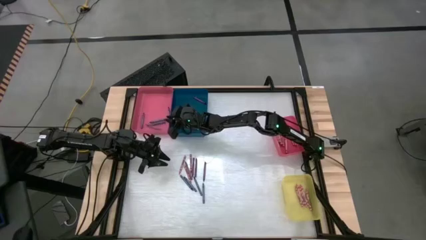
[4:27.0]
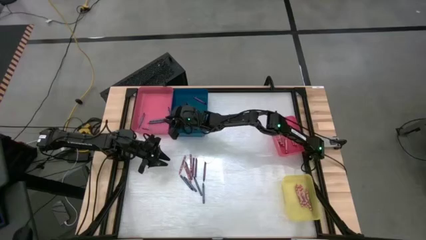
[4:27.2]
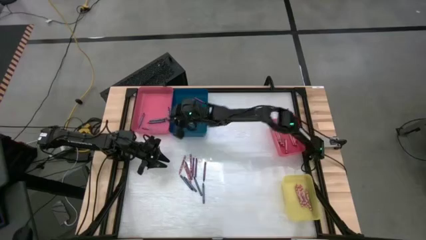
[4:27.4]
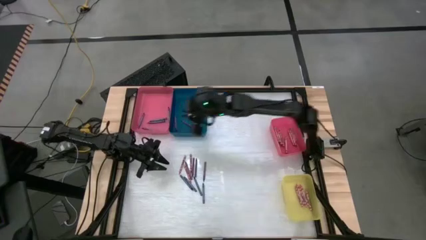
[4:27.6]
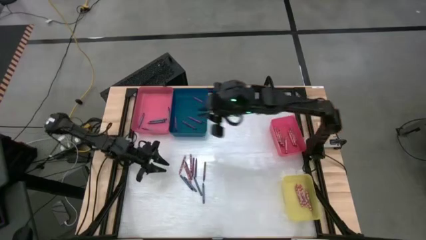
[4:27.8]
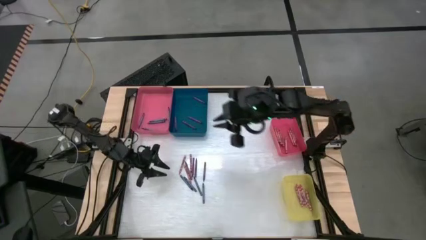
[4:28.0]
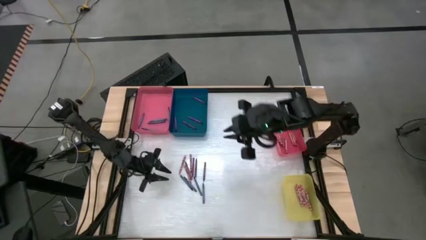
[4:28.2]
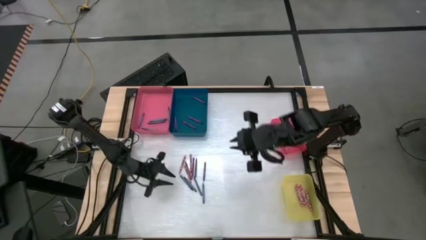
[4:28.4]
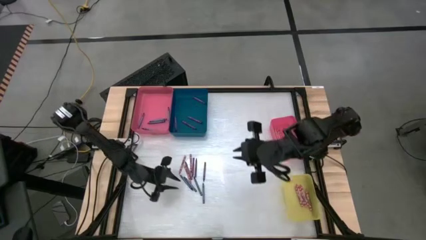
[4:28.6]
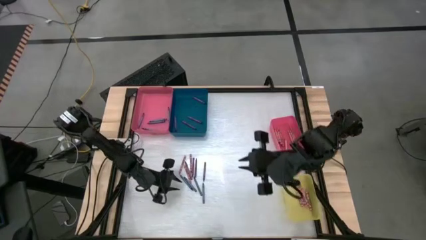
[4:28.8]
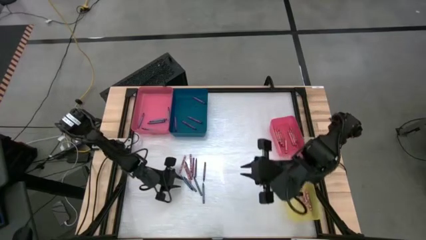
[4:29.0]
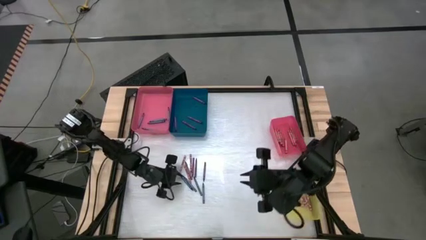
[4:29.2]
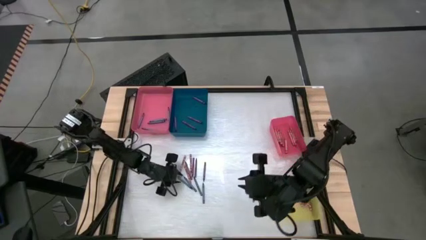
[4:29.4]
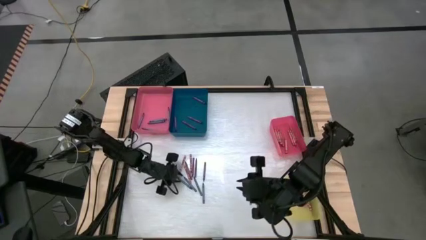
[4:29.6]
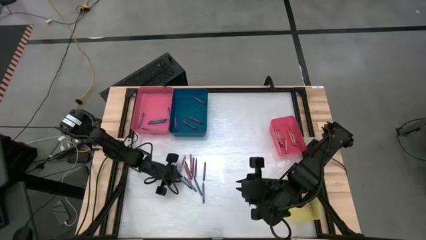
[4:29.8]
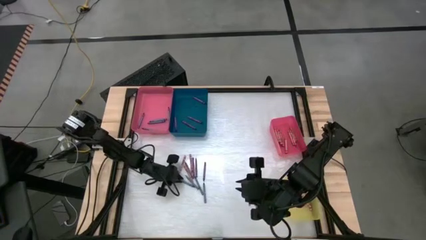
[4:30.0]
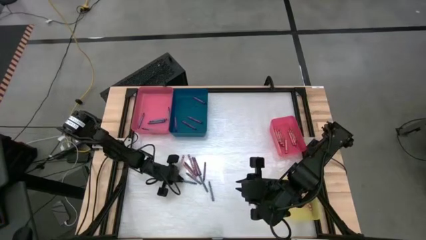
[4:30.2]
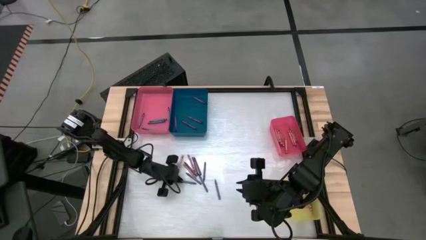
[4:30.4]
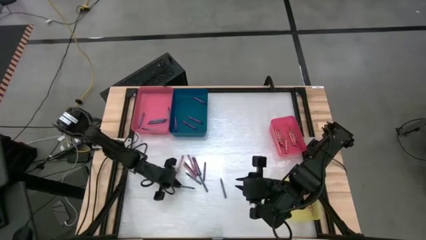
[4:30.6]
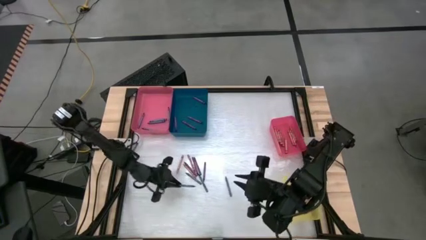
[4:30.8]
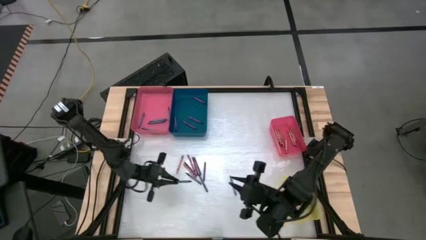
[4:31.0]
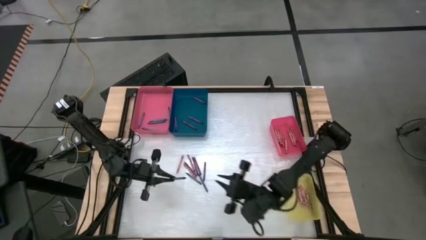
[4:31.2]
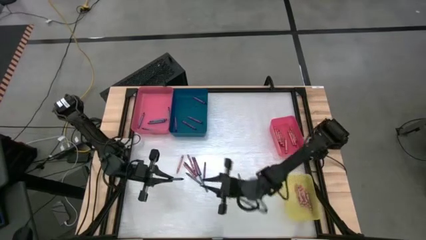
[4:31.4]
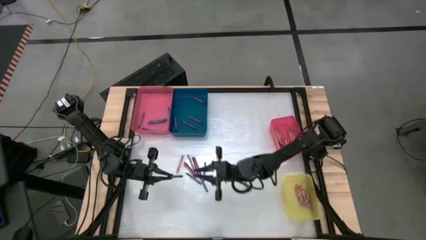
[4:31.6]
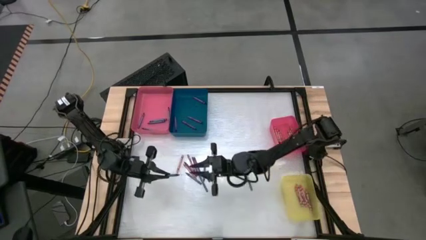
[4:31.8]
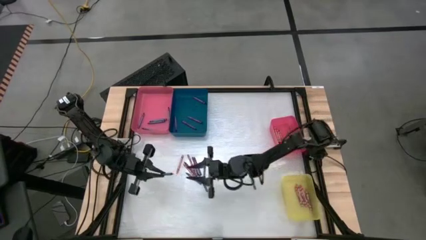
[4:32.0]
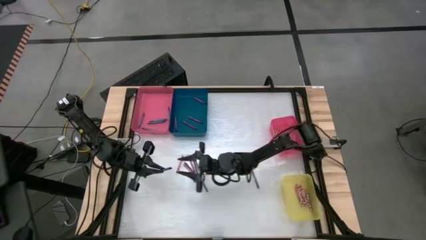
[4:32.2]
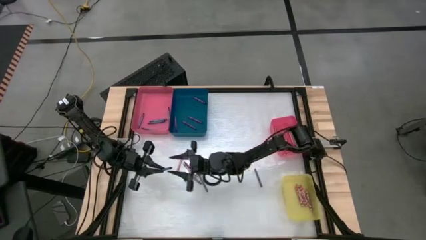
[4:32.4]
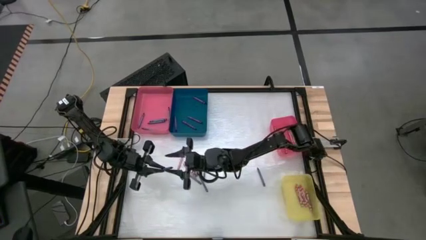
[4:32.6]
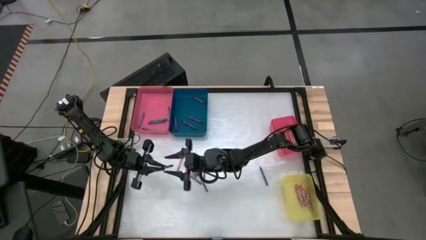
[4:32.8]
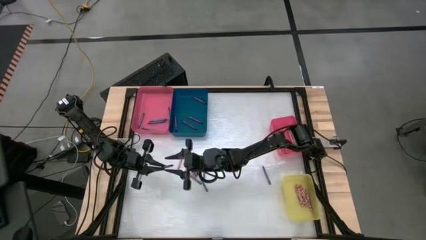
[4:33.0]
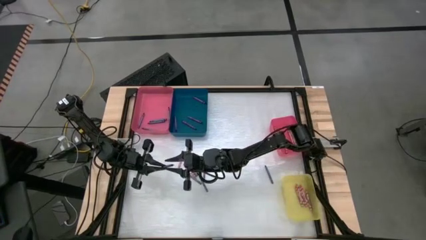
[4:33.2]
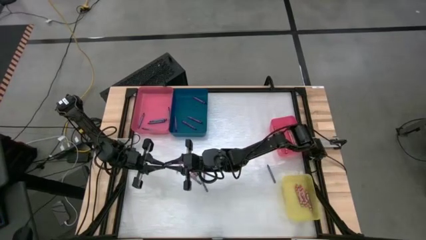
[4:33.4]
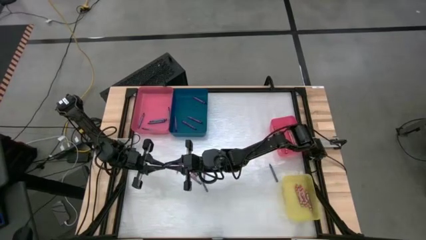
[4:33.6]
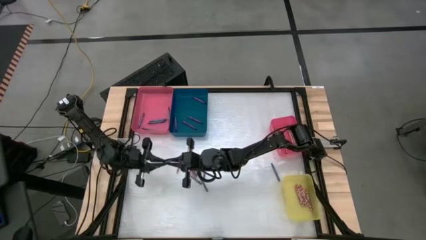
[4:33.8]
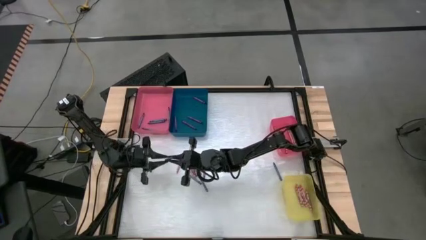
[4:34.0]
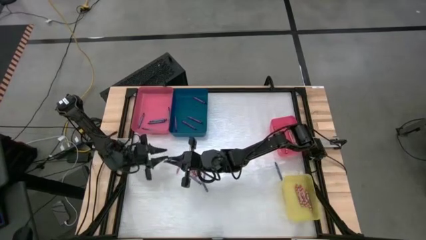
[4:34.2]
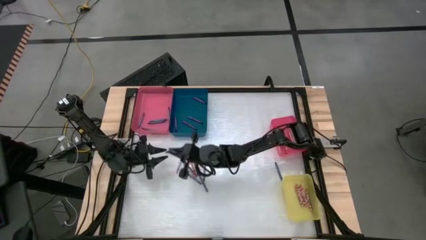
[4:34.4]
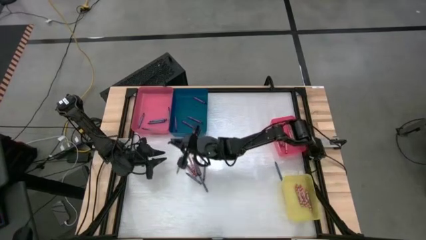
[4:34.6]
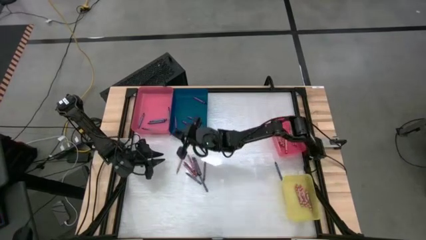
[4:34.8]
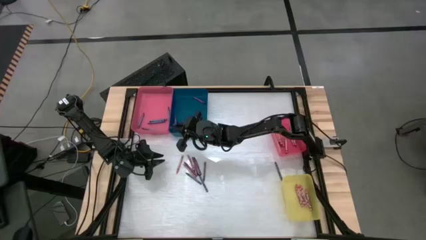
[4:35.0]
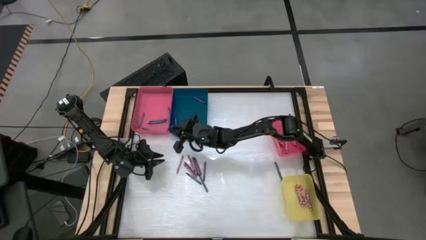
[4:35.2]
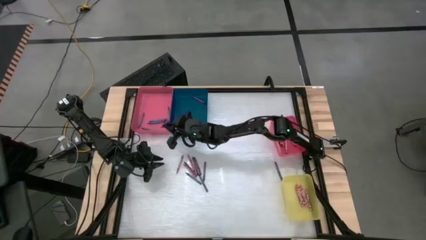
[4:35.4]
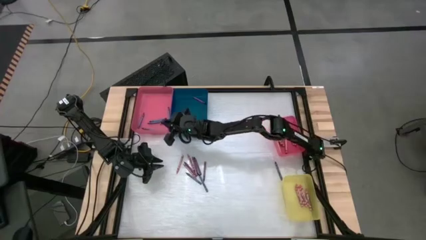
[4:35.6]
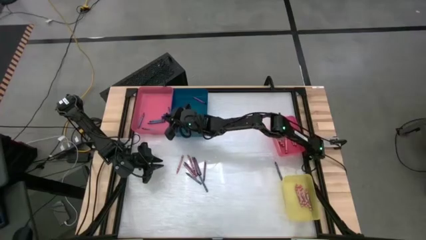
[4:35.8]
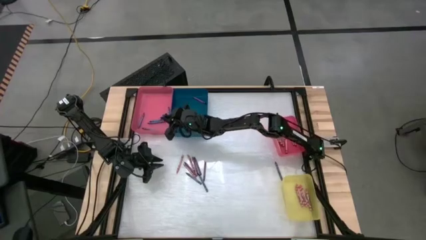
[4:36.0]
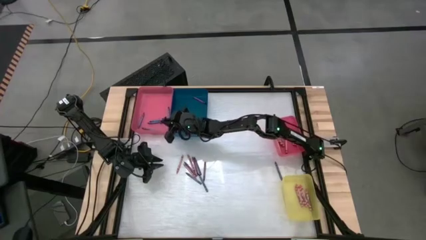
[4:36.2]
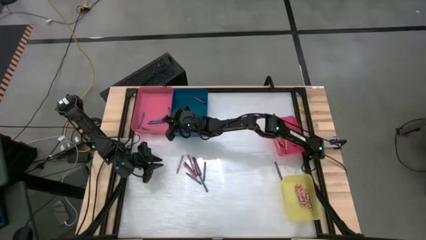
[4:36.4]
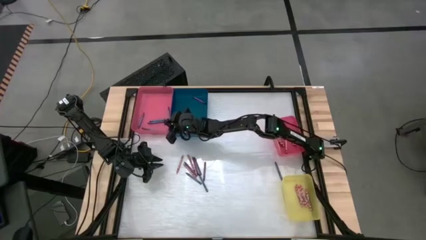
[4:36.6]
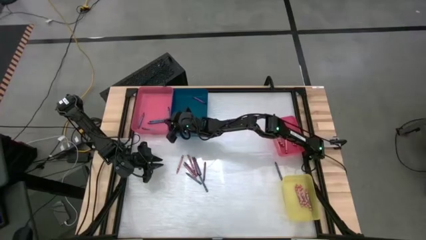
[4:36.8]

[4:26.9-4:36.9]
Task: Sort crayons
Put the blue crayon into the large red bin

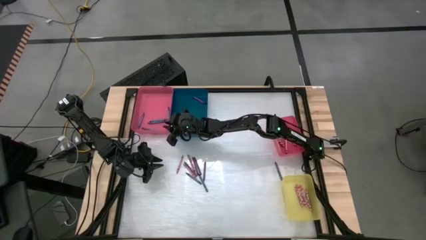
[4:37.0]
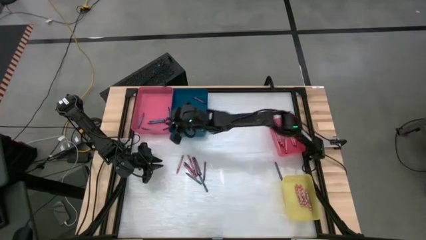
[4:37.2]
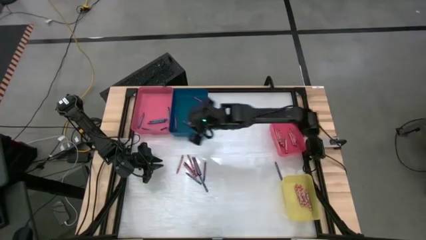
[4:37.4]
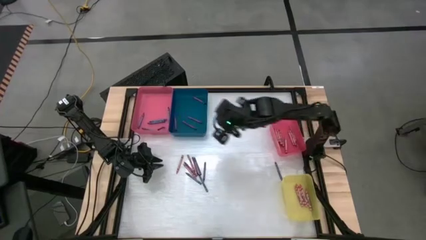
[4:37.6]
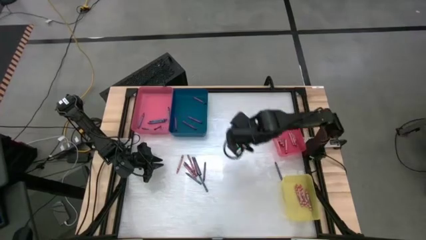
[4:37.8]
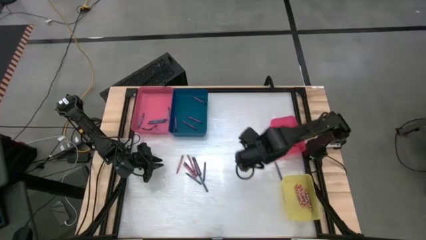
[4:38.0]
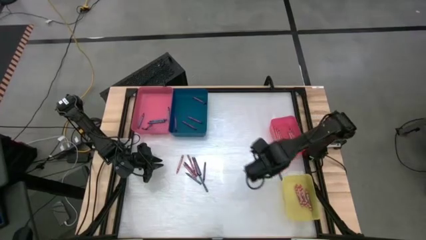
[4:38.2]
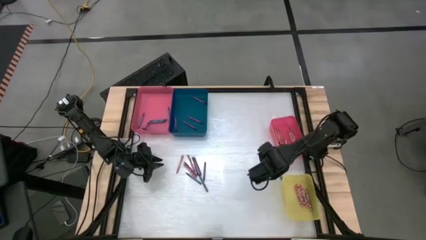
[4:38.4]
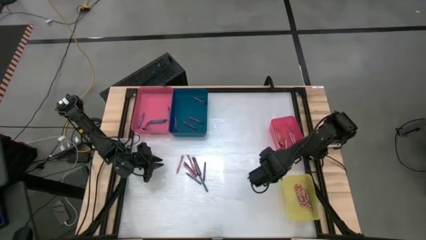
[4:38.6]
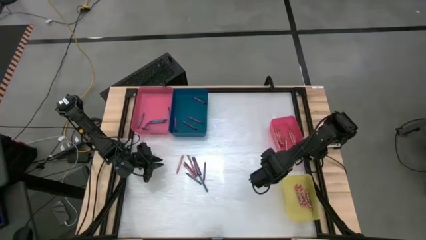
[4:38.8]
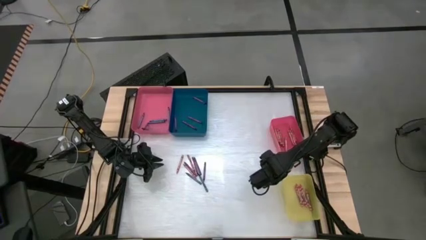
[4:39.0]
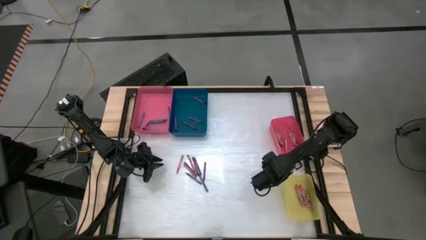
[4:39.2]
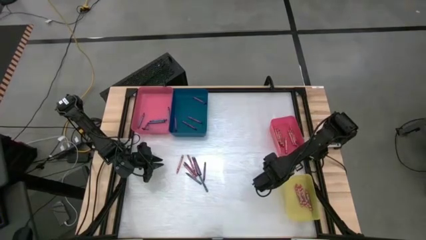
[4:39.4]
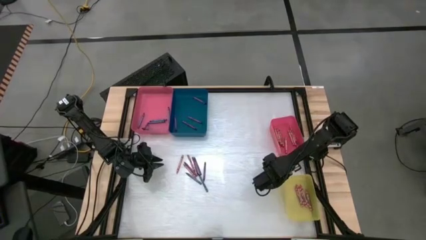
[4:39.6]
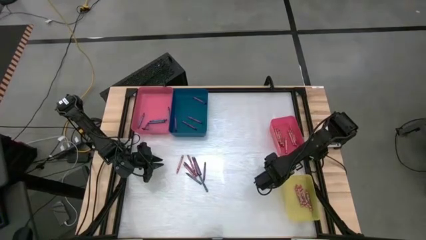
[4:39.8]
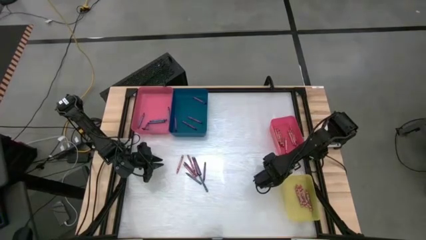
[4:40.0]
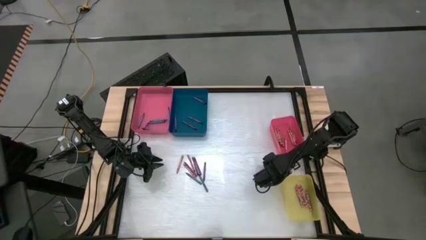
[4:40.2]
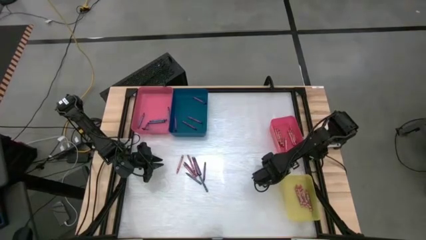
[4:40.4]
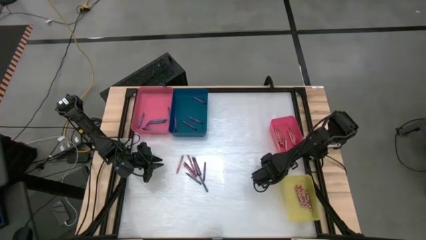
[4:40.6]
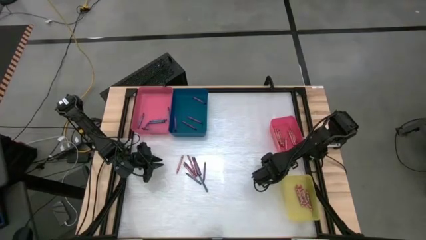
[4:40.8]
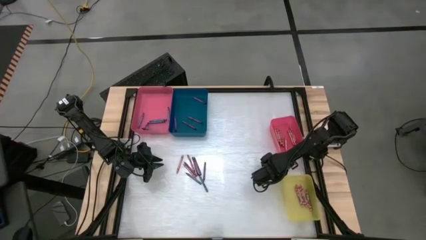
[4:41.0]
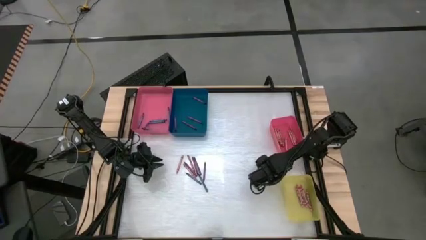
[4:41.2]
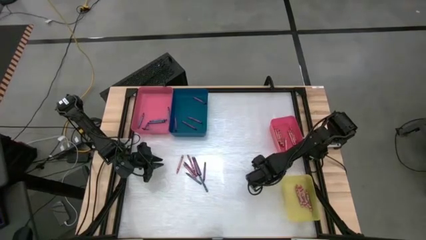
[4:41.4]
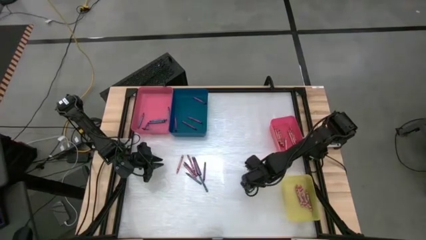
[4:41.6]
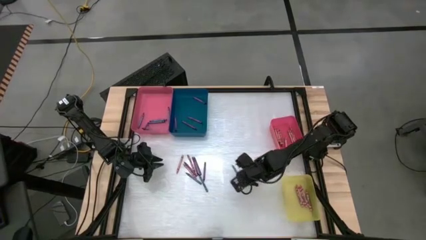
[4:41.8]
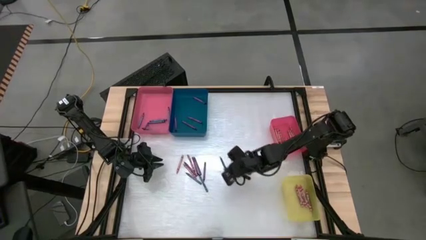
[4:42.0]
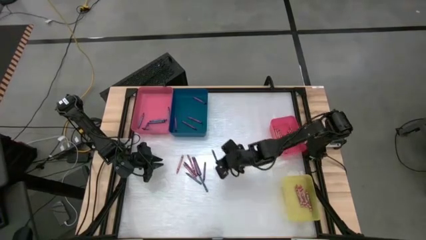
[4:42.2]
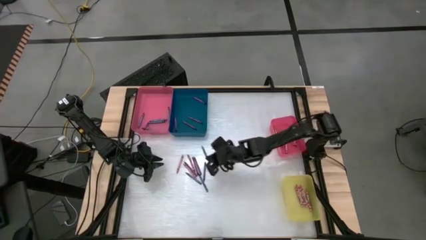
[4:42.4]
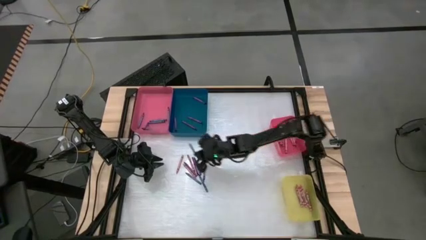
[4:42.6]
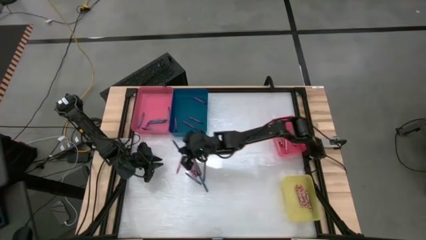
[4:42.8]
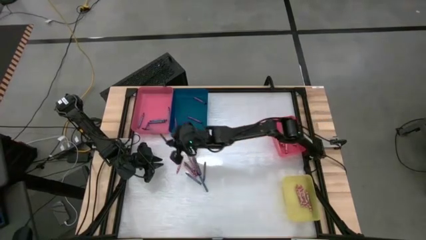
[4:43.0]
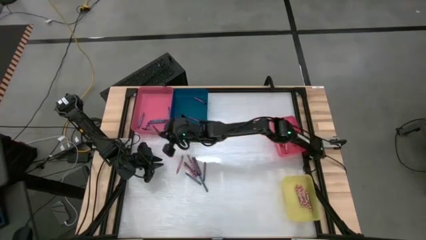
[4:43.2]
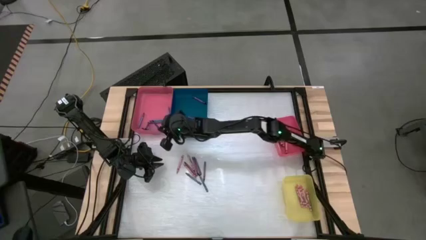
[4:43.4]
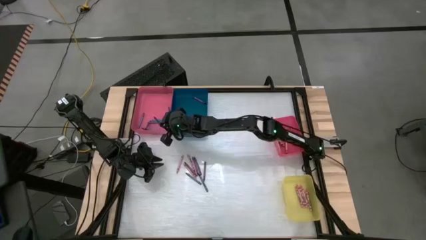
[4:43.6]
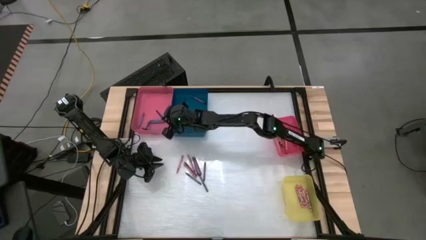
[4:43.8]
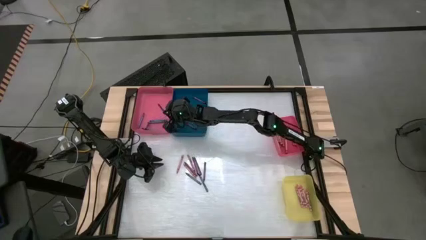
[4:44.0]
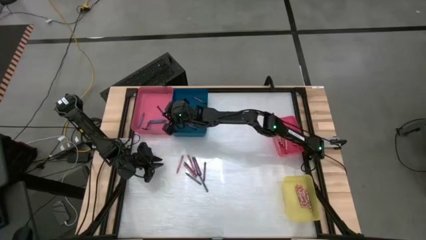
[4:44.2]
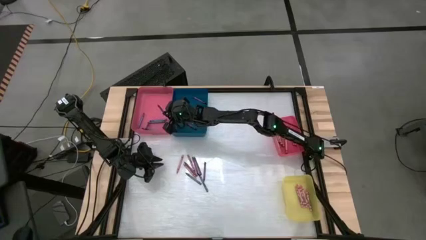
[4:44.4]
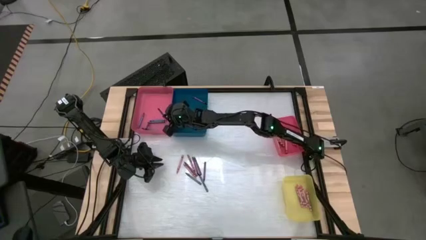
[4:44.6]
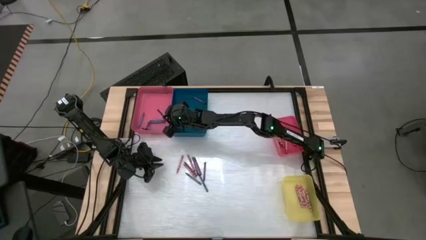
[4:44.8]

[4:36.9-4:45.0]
Put the blue crayon into the large red bin
